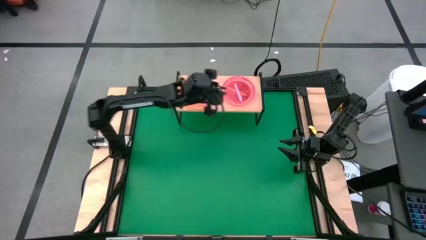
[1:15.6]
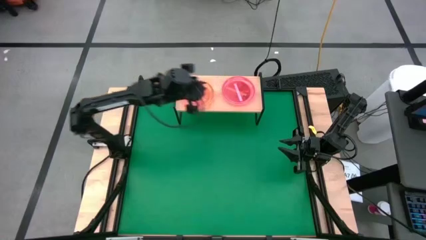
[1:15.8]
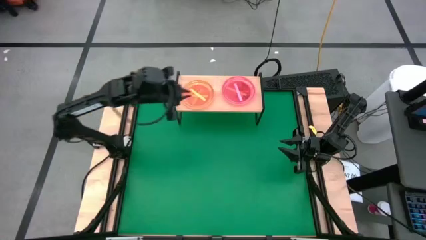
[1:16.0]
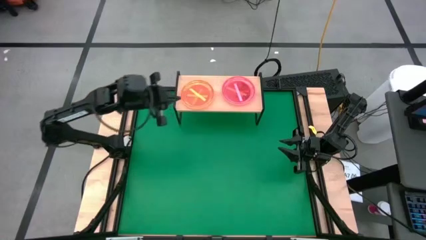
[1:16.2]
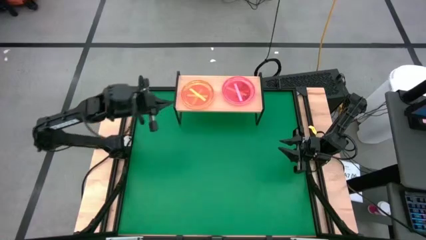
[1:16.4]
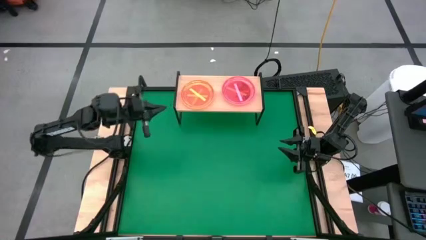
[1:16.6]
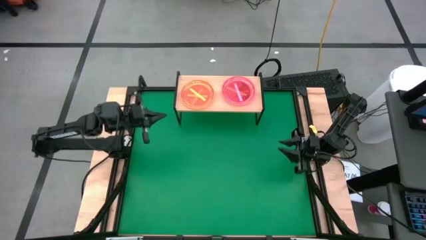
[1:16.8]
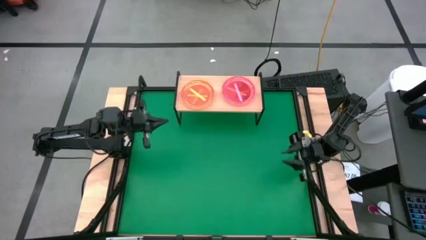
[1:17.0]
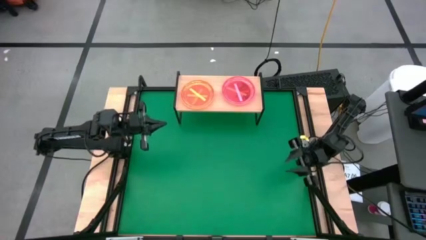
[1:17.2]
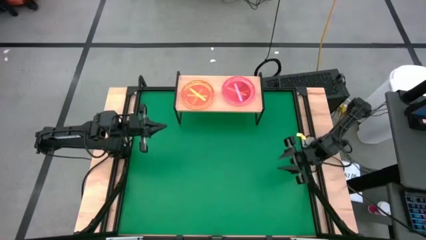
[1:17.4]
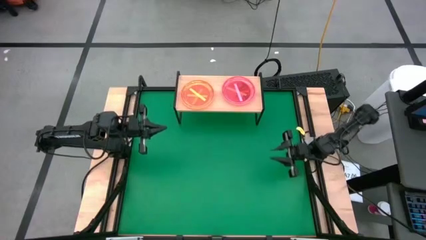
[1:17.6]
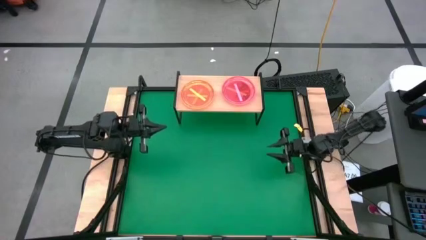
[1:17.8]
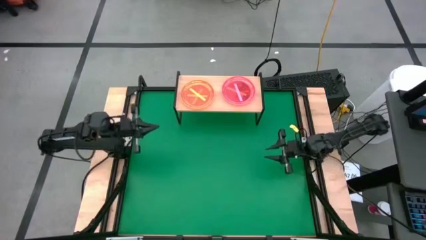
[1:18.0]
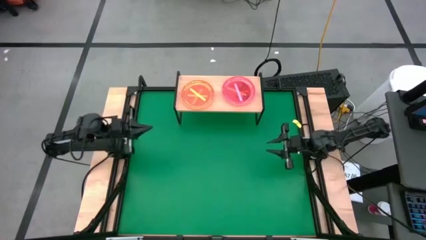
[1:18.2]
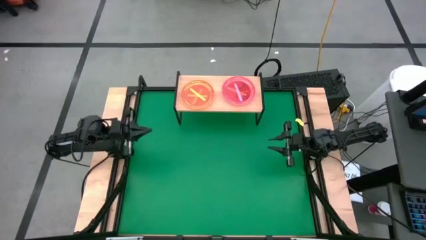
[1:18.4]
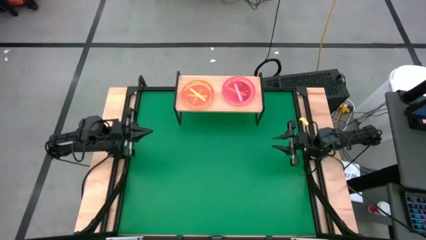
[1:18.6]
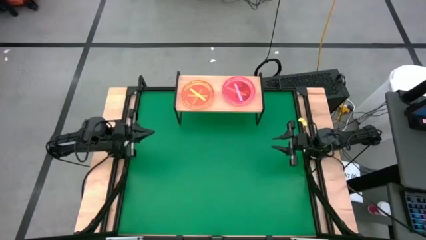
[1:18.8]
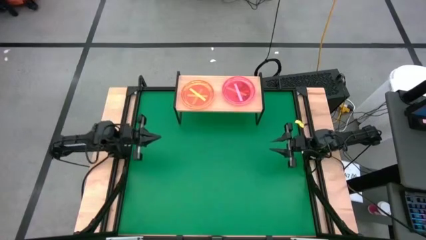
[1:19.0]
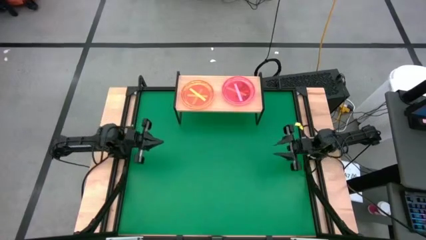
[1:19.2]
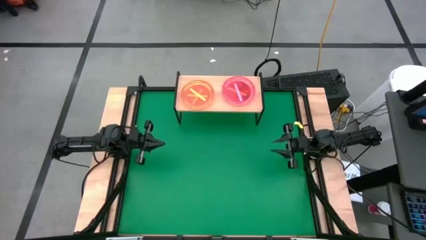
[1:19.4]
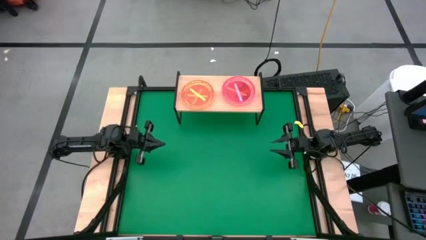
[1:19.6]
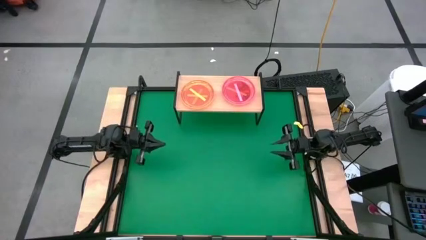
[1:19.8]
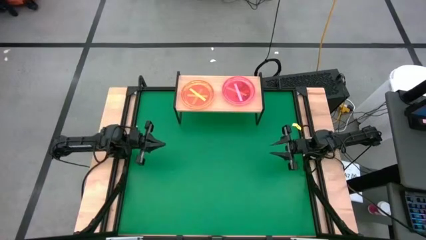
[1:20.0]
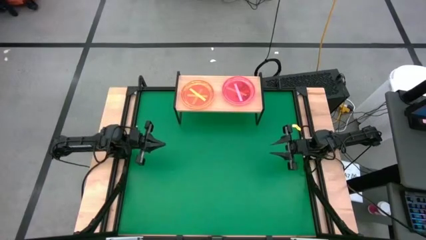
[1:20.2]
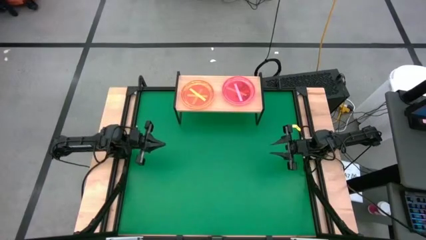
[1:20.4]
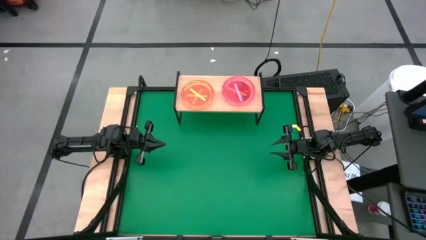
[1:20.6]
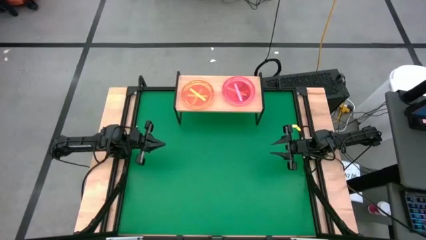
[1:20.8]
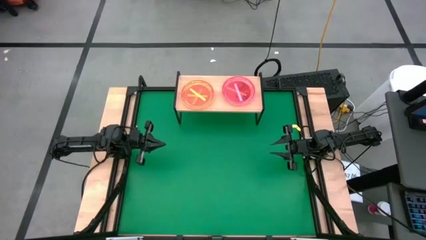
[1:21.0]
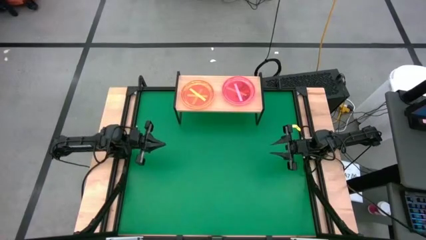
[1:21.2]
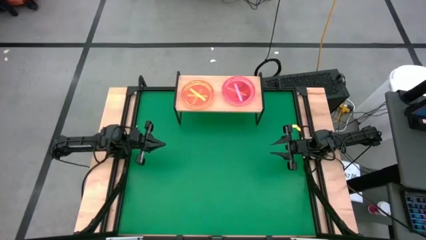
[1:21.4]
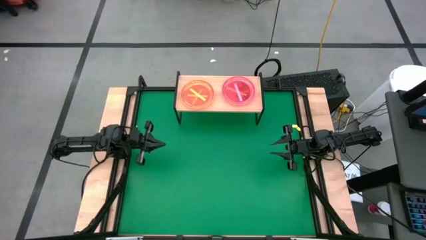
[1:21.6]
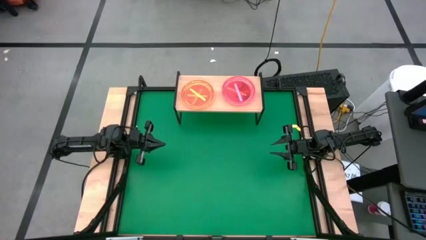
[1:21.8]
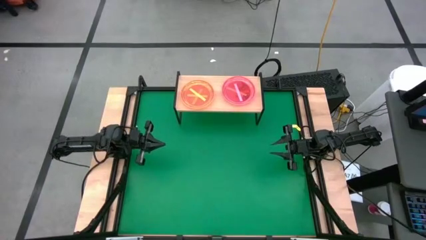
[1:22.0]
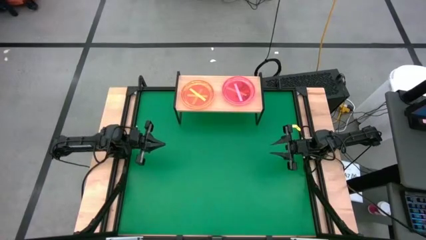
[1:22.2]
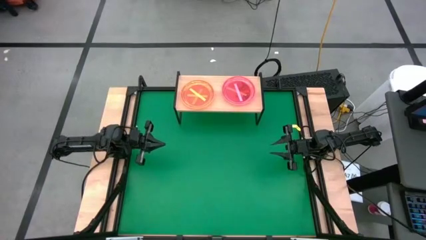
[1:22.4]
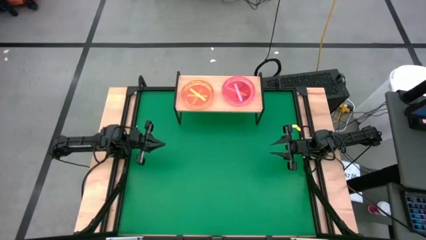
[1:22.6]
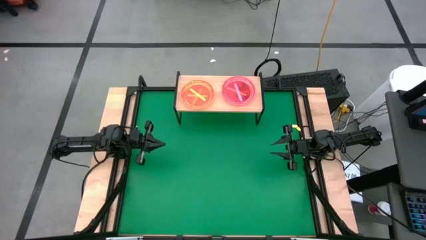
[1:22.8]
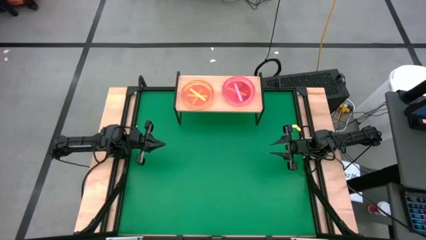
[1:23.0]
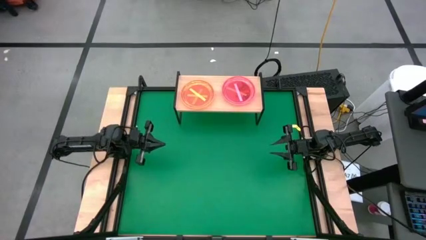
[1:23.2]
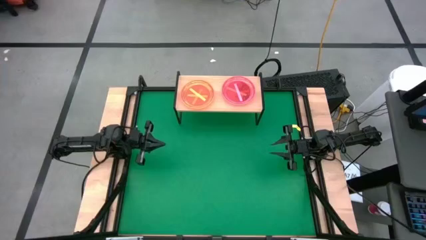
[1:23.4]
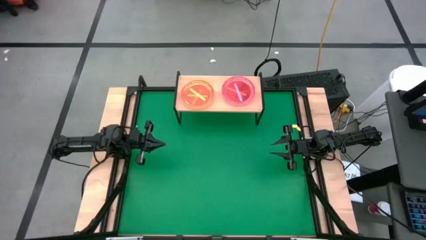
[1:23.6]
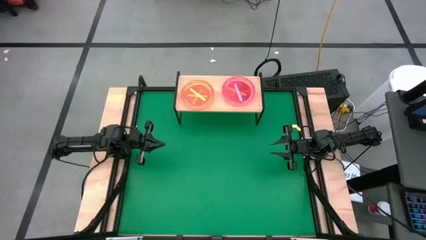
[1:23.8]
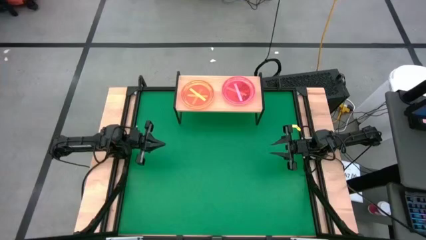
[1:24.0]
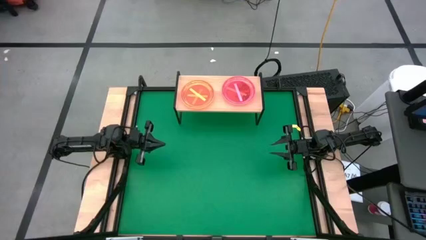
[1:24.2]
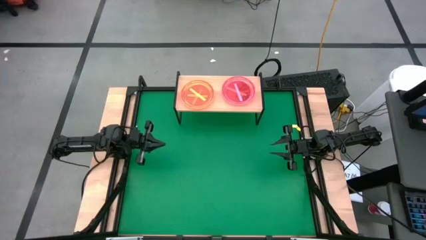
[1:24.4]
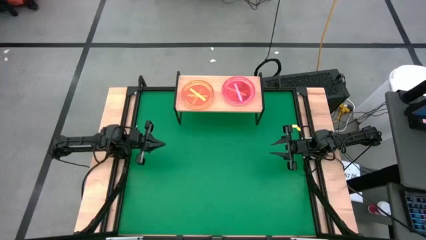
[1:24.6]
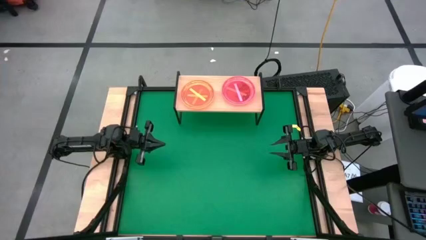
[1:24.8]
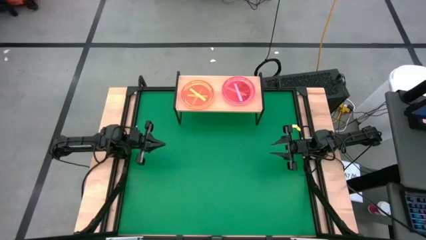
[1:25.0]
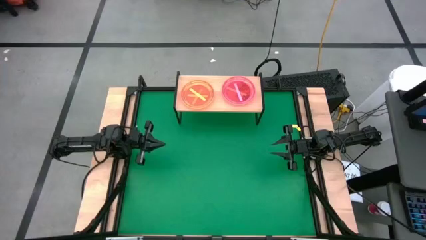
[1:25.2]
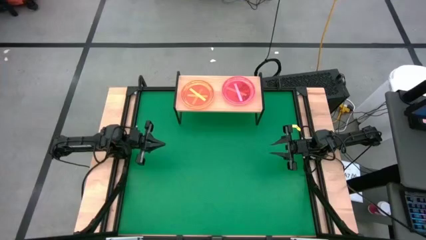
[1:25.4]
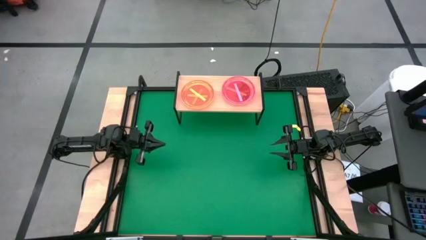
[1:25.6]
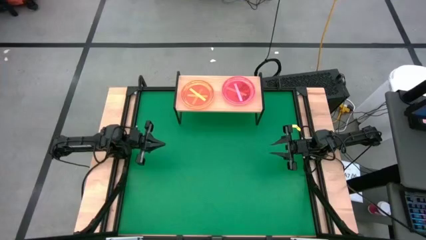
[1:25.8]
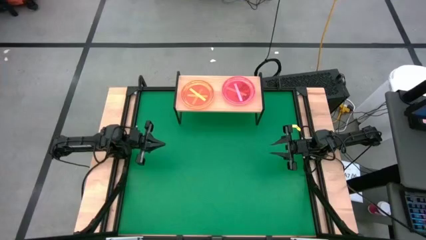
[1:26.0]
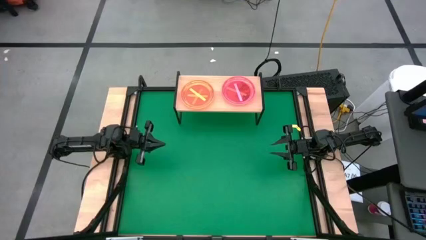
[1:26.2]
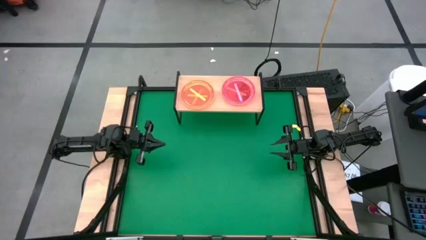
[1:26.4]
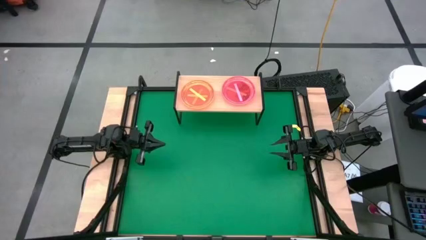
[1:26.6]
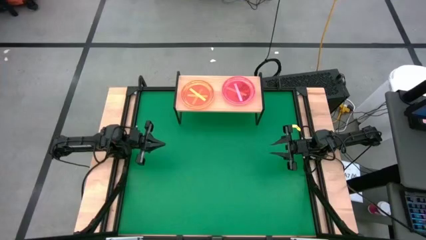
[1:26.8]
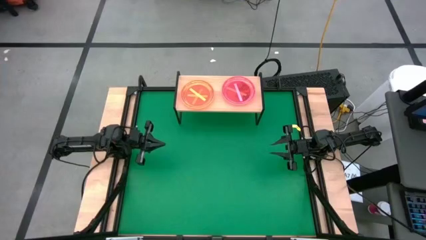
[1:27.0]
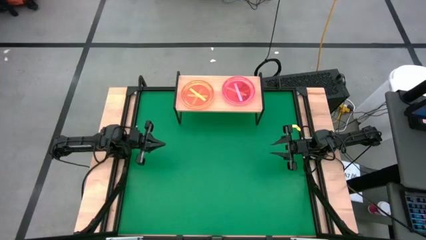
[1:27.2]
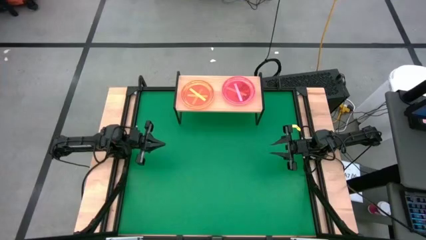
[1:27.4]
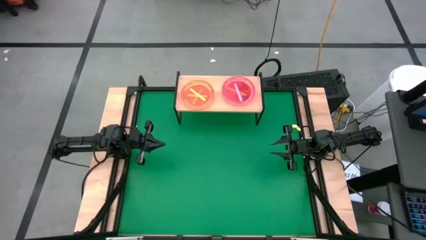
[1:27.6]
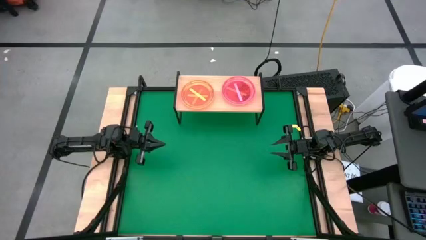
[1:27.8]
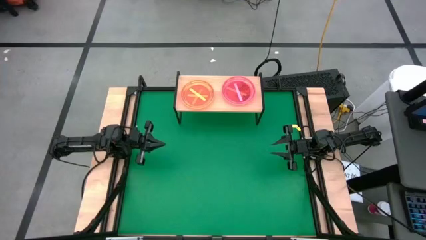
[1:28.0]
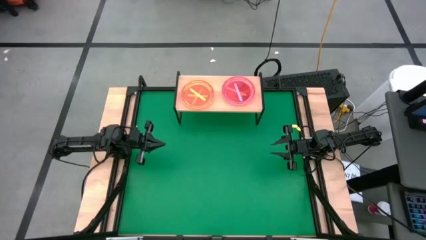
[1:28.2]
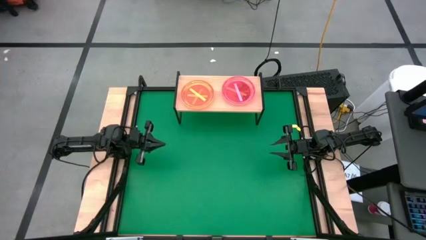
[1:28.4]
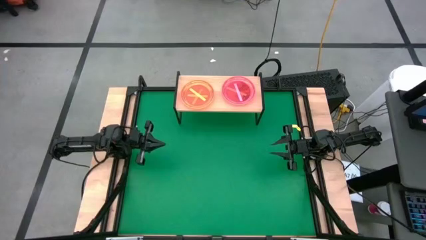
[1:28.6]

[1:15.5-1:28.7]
Task: Place and stack plates onto a shelf
Return to Home Position

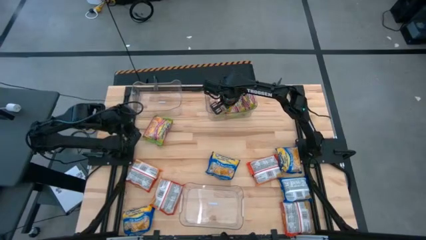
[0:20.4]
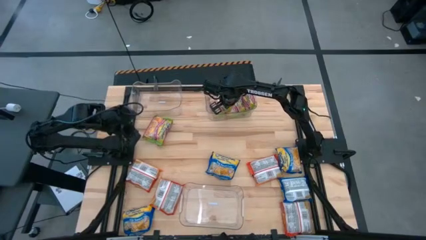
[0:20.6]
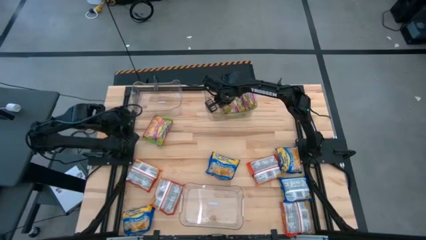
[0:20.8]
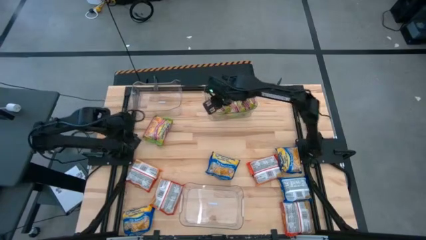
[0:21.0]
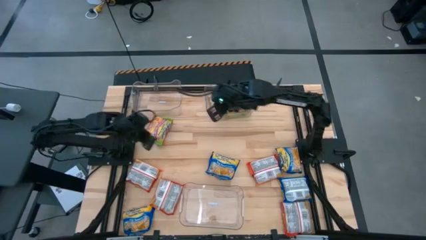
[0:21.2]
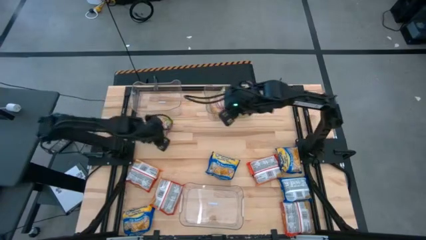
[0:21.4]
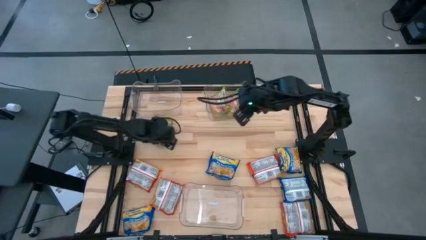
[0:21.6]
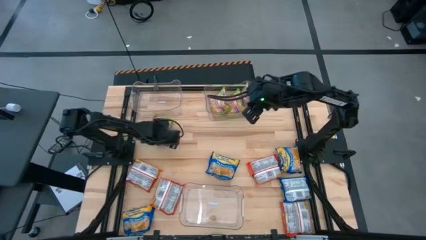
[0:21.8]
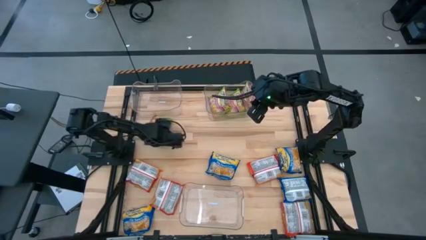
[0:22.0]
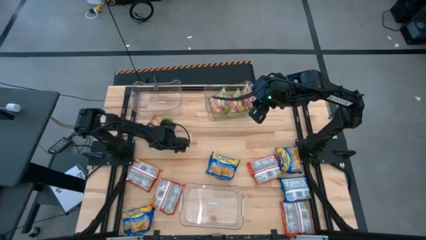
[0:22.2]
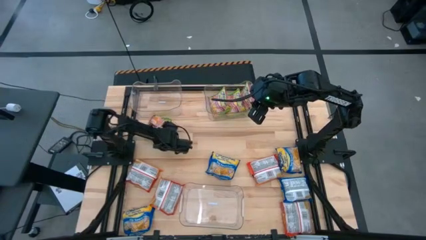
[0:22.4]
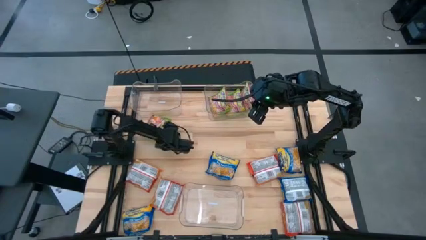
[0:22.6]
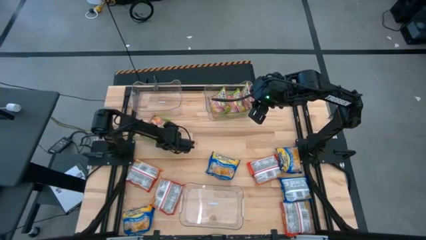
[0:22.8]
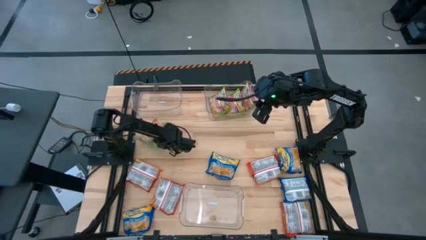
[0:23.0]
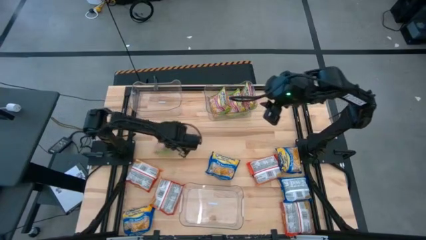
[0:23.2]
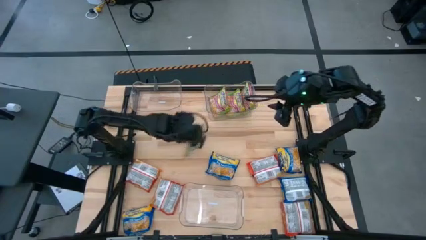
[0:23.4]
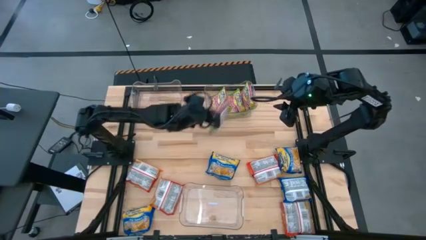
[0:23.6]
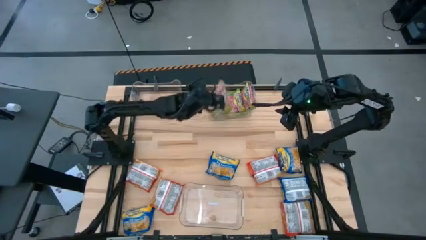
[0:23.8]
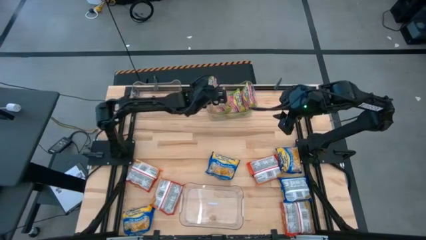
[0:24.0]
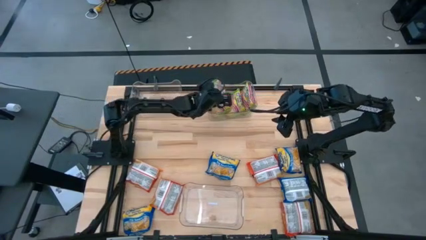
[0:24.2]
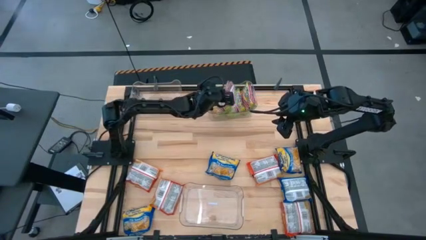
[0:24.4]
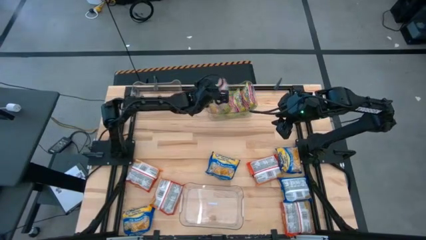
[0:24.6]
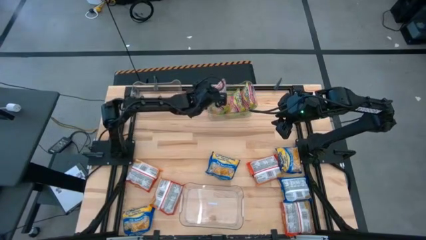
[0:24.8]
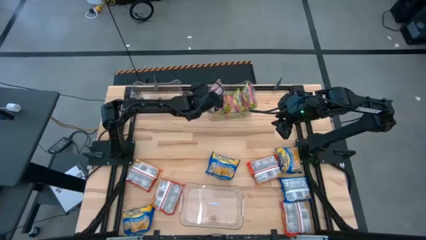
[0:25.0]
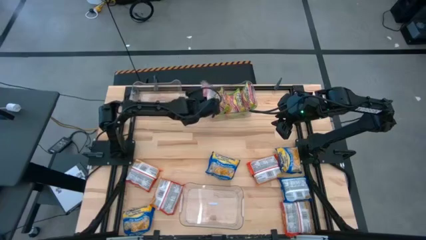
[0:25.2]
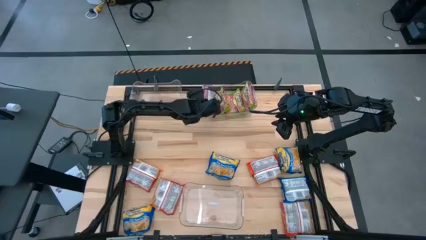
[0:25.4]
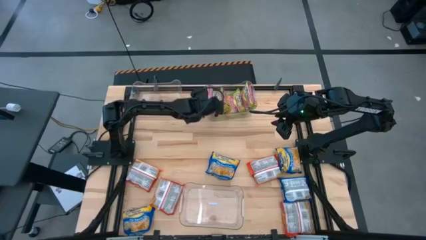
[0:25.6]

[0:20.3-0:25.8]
Task: Sort Maruchan noodles
Put the green noodle pack into the top right transparent bin
